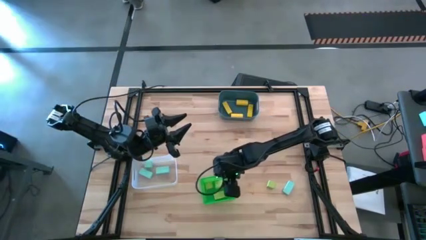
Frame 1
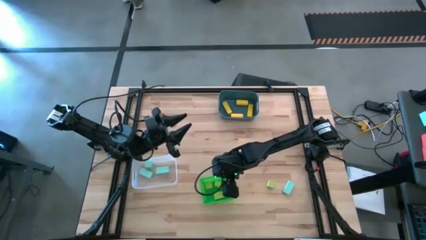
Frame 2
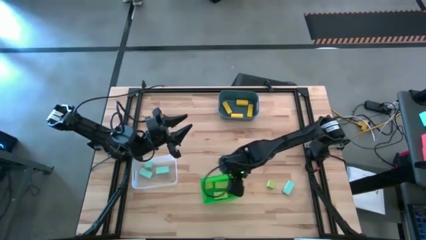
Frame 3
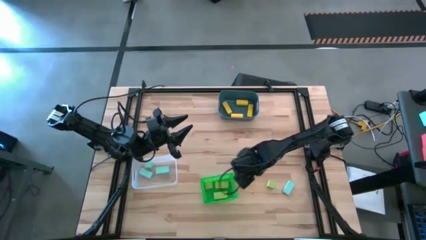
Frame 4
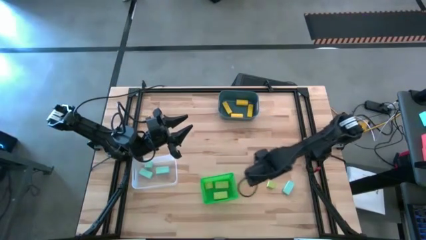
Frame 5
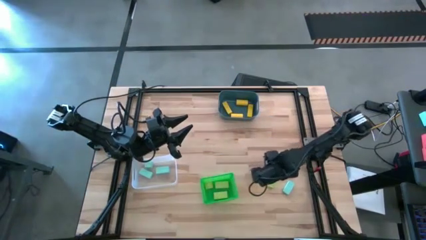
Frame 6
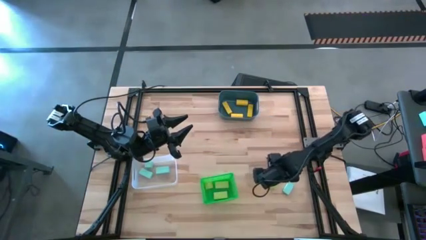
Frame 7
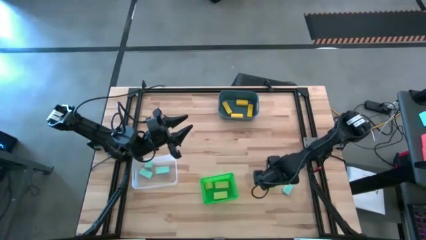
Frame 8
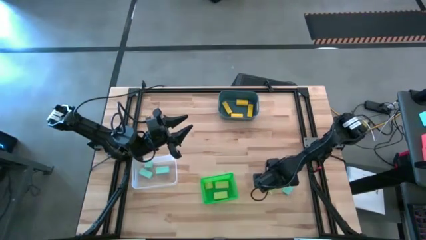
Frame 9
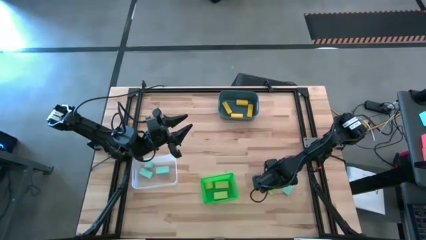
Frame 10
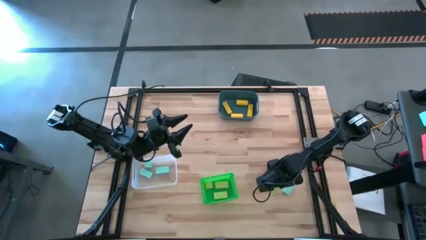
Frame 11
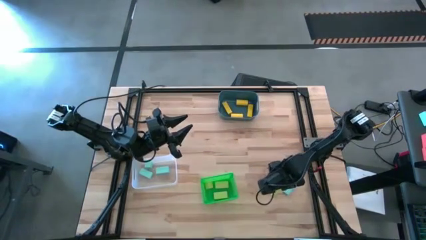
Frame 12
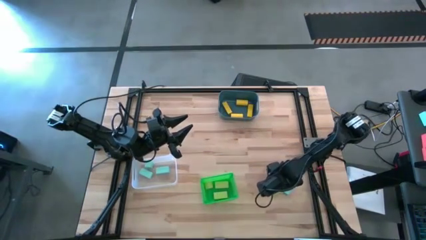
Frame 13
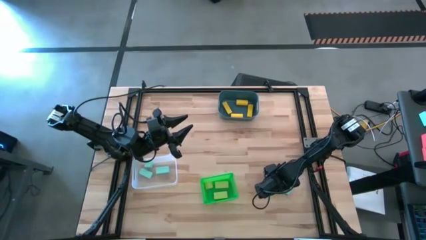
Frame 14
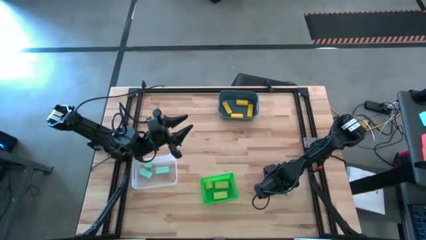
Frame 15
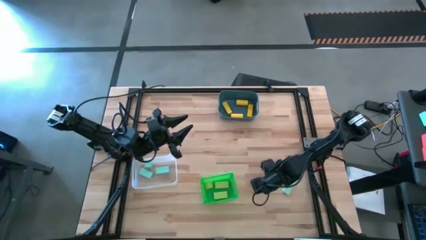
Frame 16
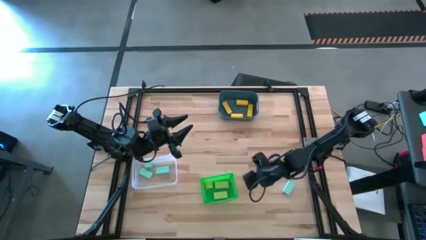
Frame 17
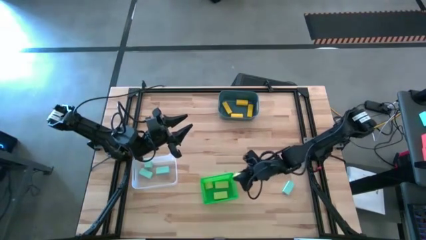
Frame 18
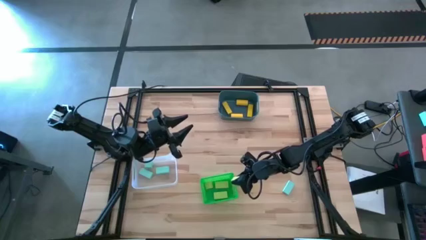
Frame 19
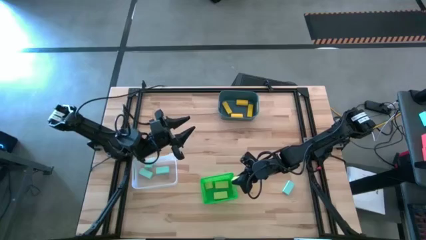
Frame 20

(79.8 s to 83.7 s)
Task: Sort & place blocks by color
Put the green block into the green bin

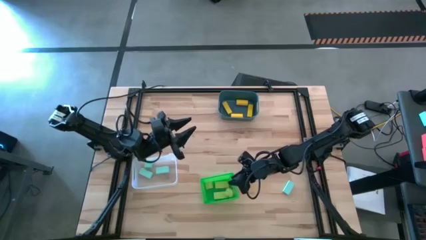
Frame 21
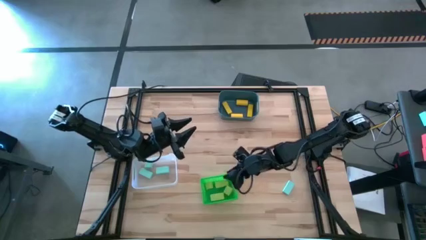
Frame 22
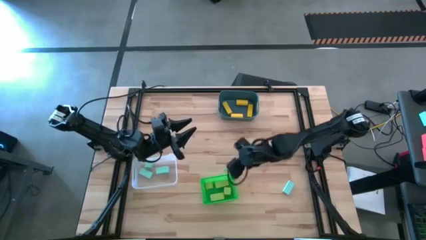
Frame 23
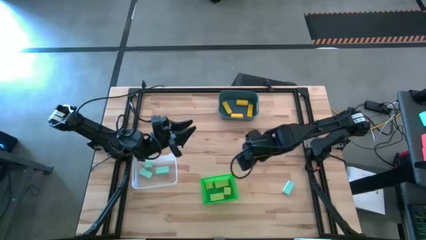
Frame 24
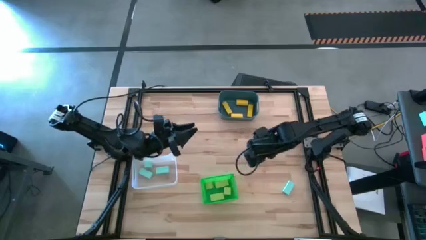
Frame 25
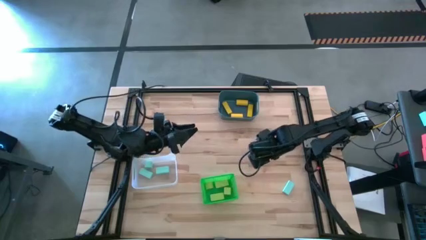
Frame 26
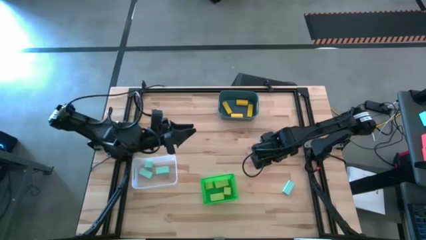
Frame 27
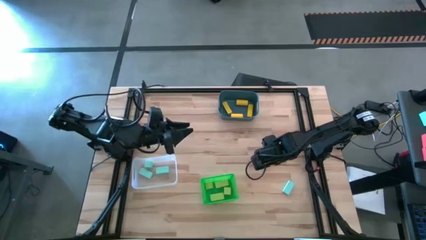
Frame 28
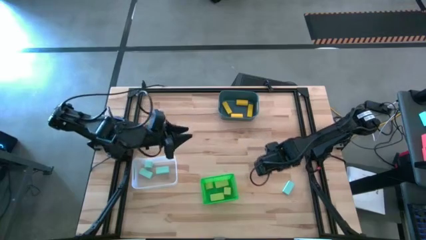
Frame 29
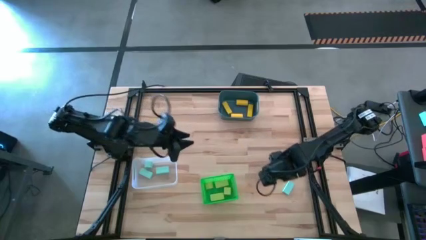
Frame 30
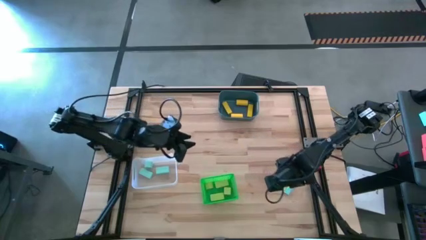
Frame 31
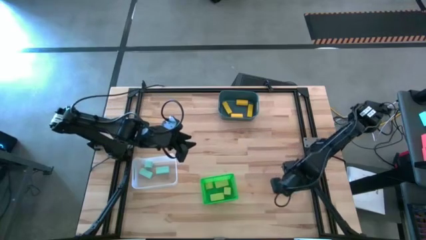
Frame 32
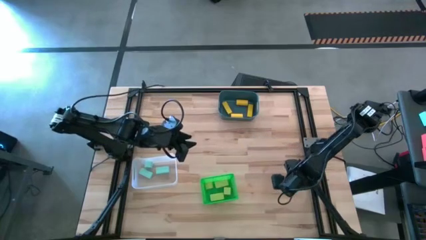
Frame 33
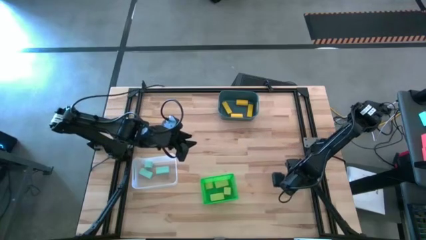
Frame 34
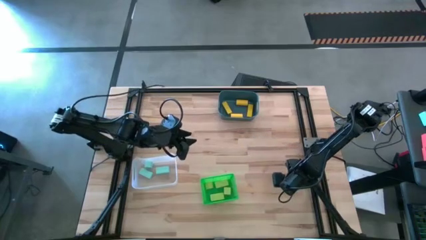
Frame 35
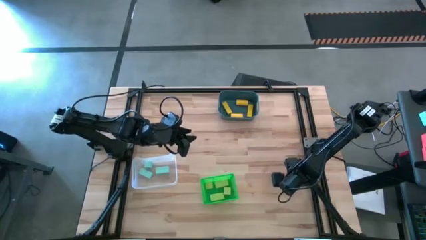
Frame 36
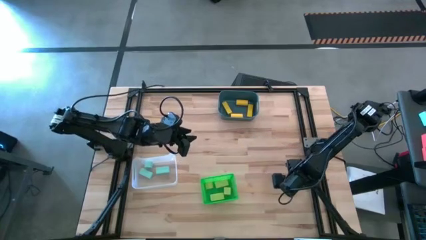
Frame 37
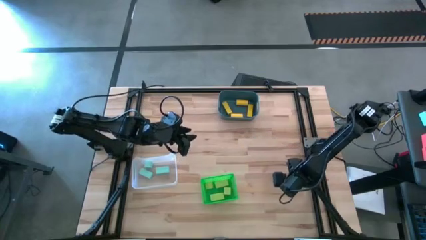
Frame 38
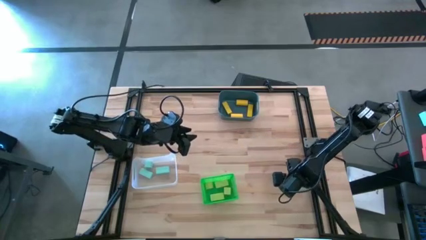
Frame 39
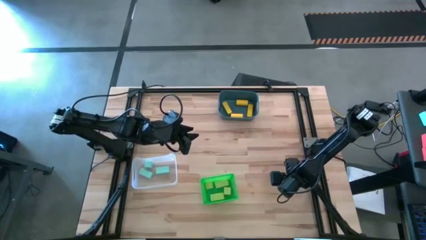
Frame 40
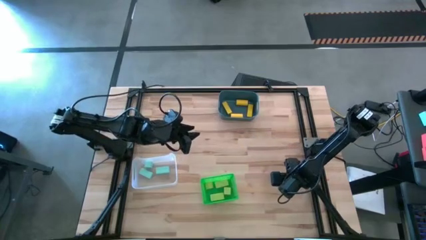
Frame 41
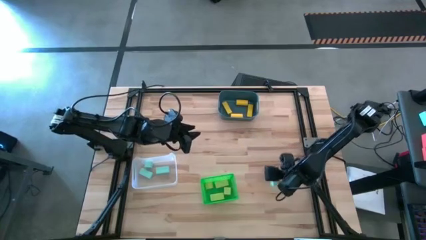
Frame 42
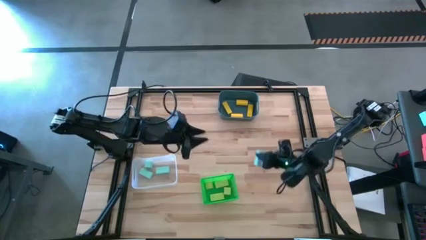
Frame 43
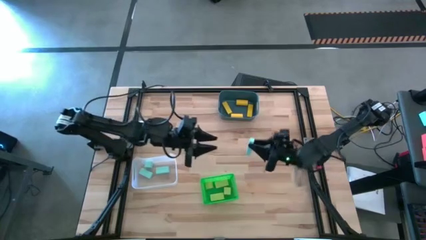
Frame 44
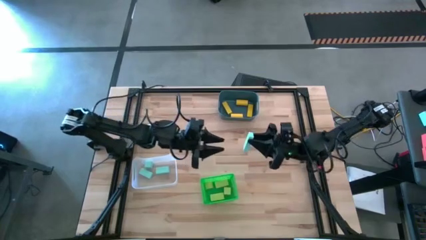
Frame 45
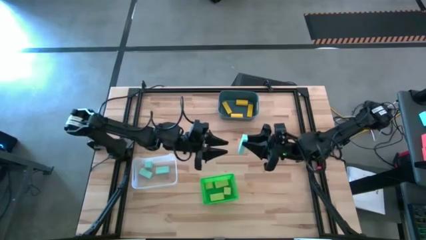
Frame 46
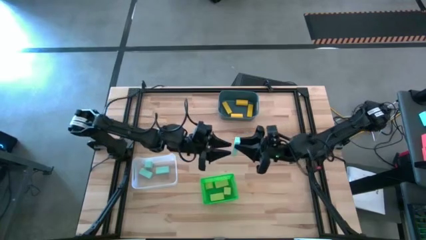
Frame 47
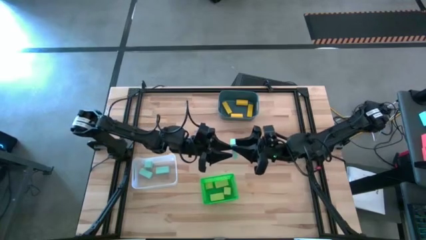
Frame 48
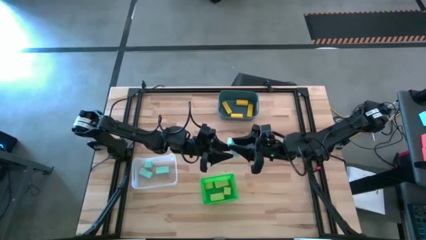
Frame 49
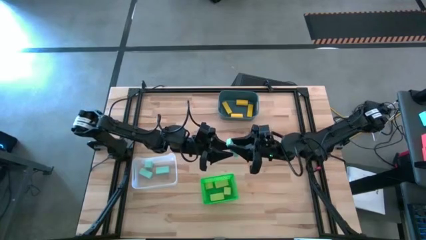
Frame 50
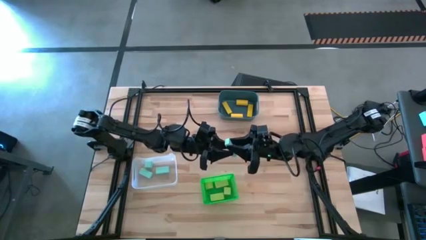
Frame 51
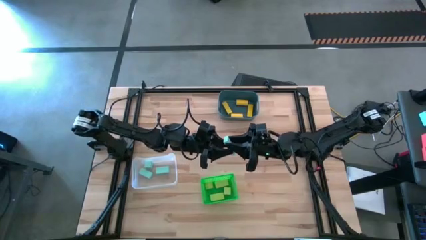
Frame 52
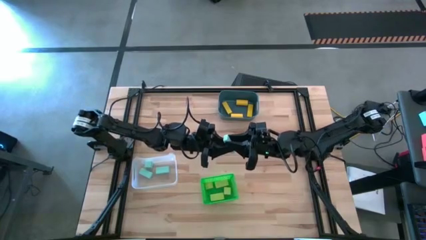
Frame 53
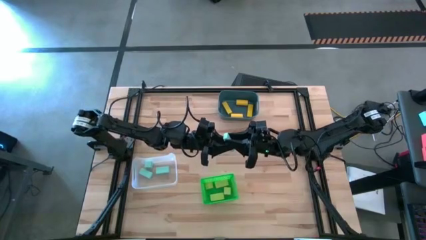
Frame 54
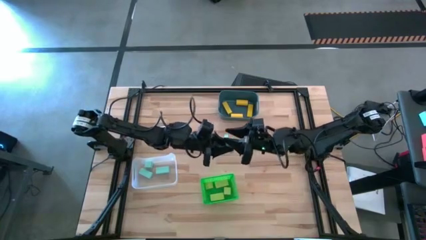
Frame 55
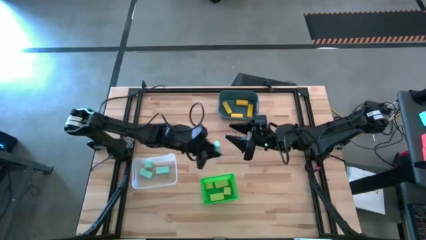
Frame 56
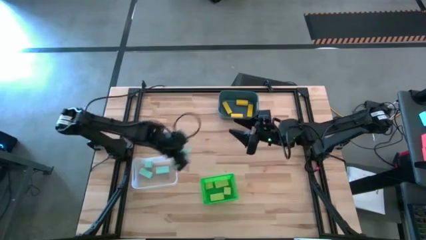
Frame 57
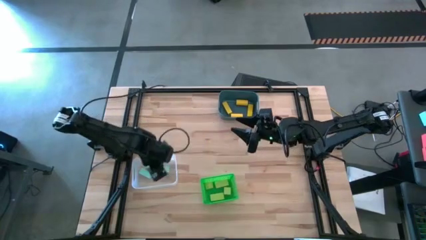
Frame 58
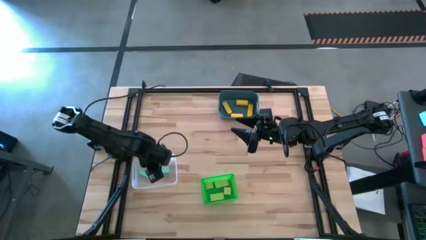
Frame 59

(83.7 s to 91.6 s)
Put the blue block into the transparent bin

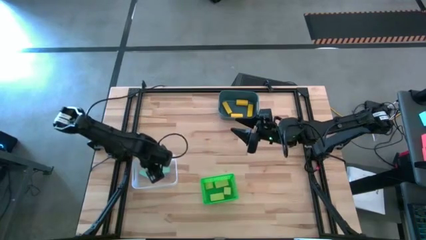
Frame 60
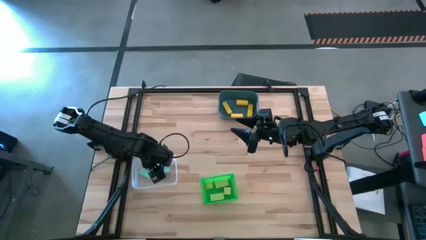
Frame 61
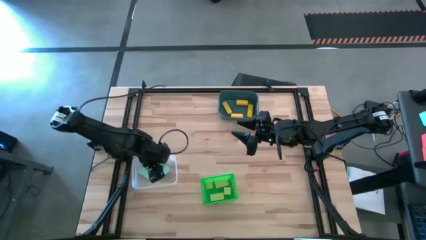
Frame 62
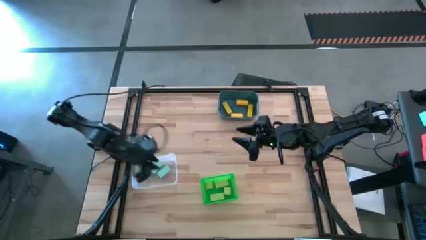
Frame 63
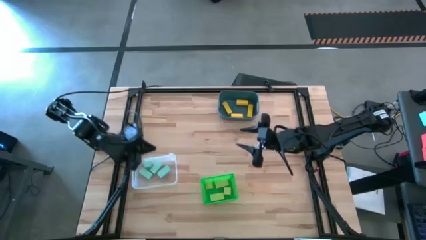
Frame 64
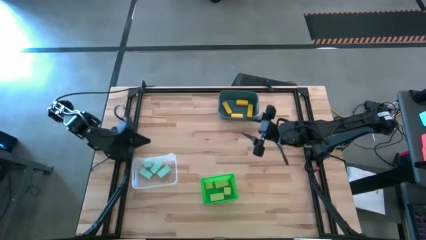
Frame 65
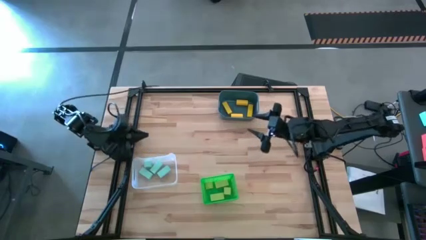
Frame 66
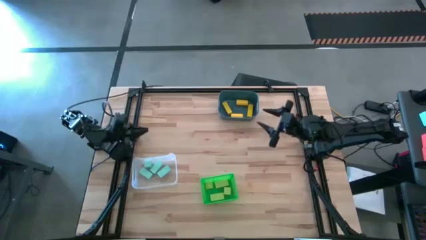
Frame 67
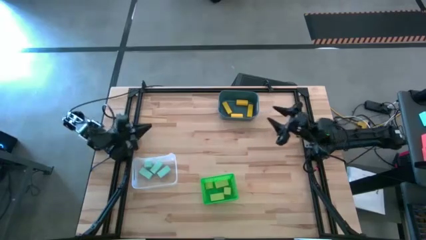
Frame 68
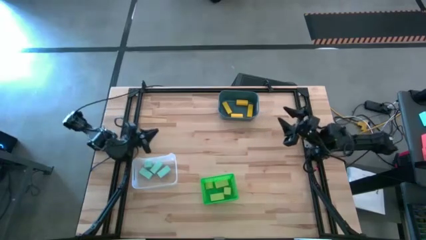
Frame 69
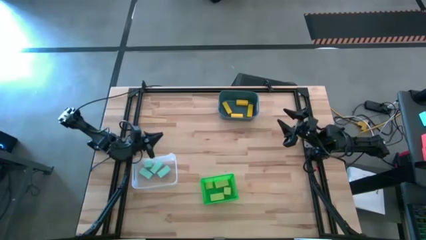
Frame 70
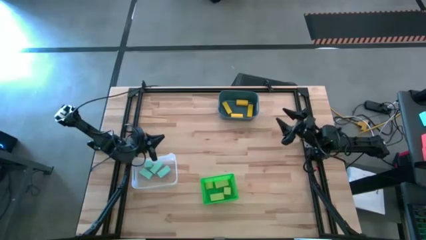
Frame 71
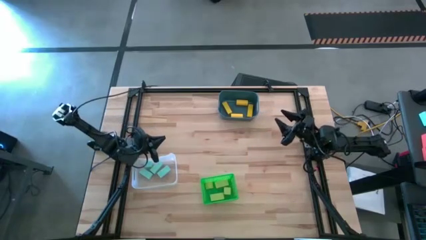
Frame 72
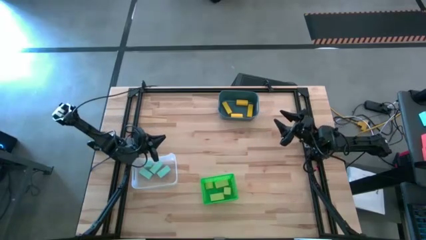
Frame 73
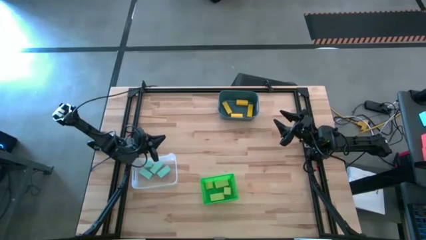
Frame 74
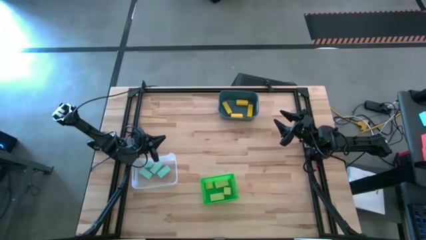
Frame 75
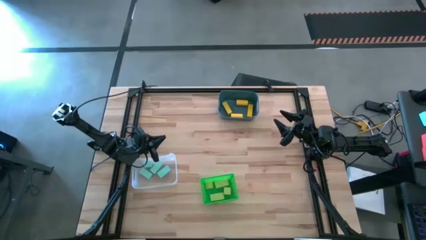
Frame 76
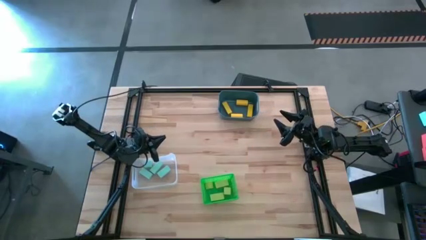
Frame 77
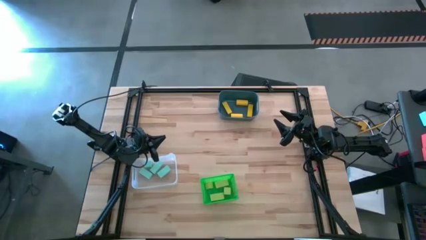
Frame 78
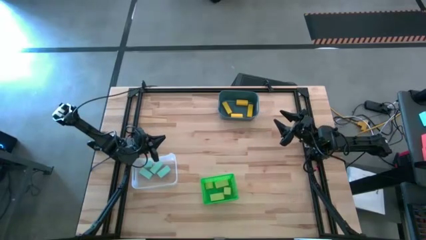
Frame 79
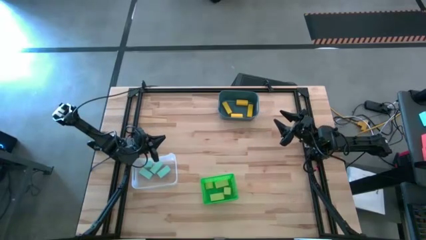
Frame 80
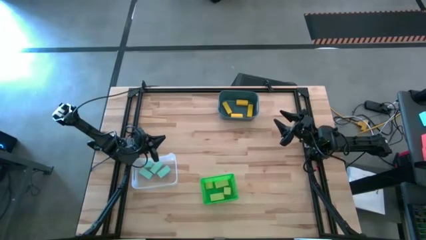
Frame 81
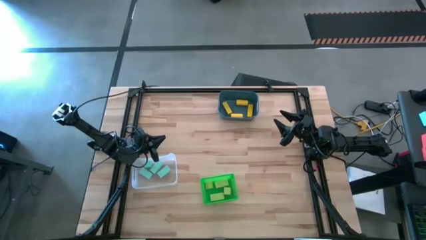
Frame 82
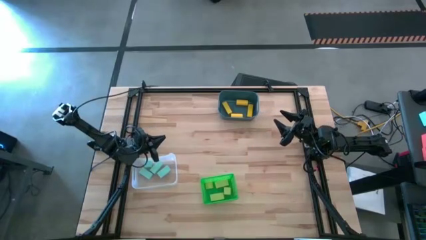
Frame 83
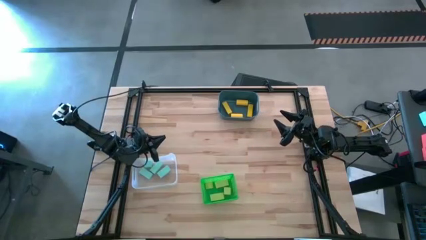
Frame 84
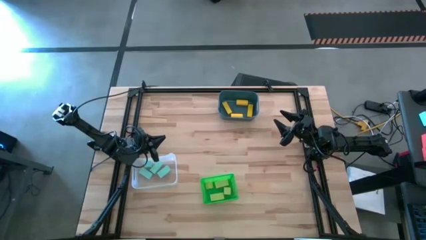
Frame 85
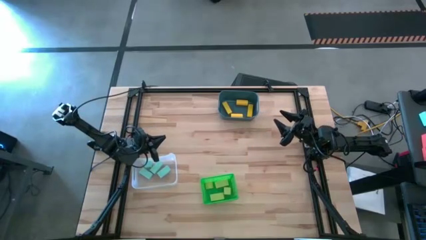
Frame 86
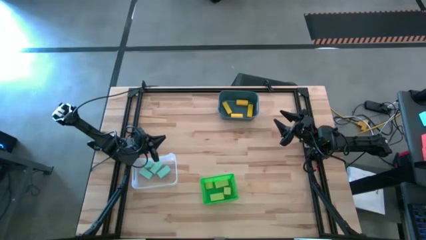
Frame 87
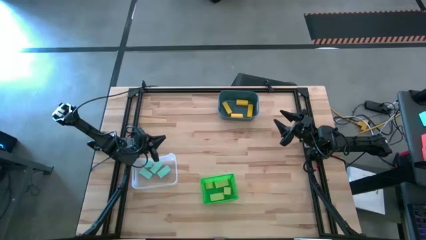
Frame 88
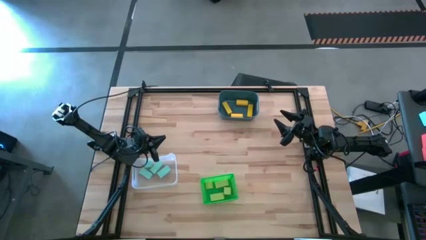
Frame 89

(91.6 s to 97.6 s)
Return to Home Position
